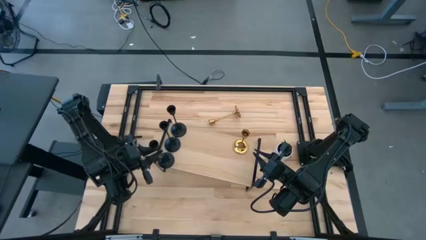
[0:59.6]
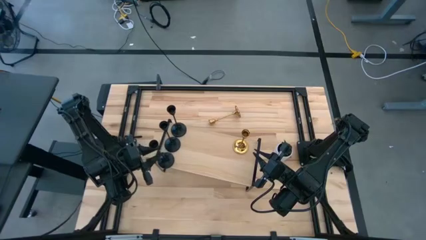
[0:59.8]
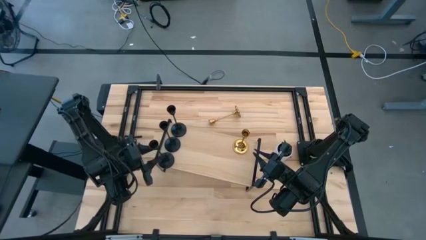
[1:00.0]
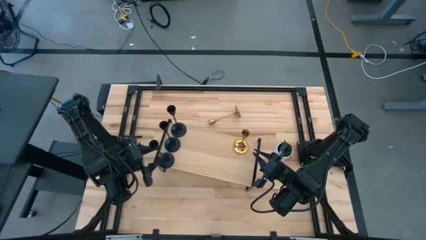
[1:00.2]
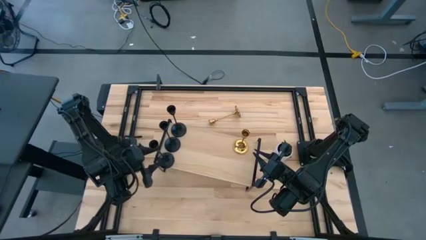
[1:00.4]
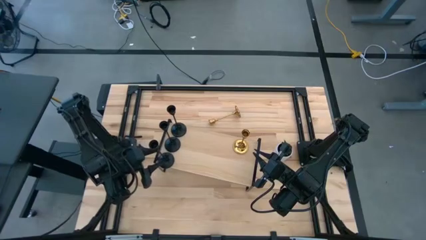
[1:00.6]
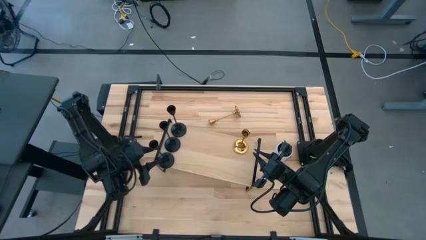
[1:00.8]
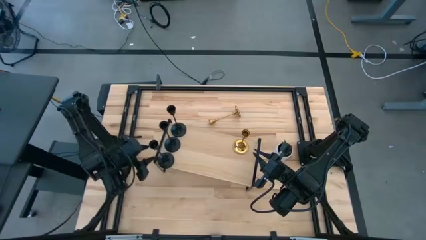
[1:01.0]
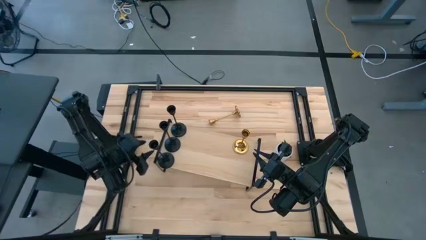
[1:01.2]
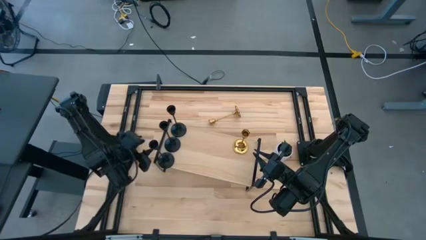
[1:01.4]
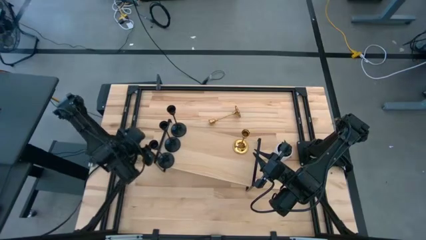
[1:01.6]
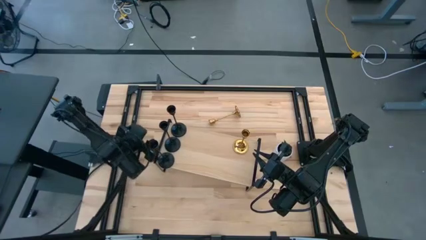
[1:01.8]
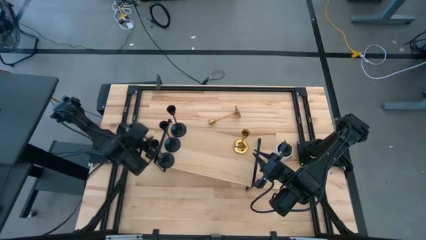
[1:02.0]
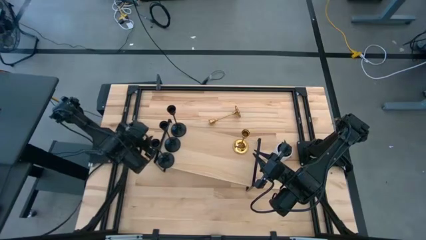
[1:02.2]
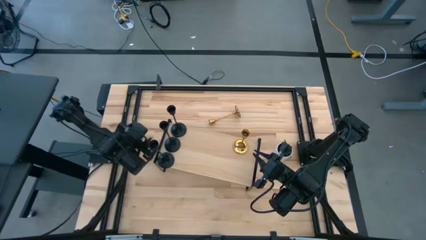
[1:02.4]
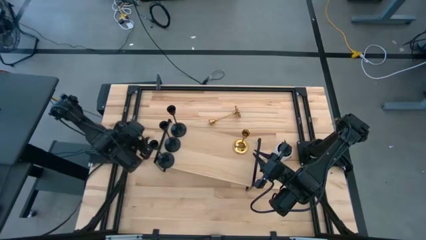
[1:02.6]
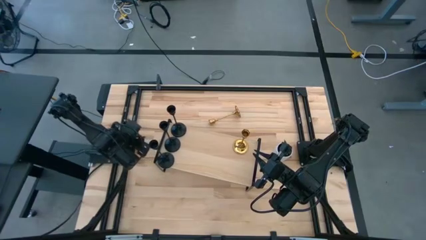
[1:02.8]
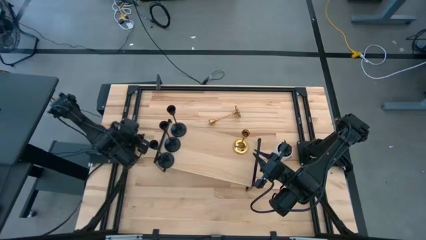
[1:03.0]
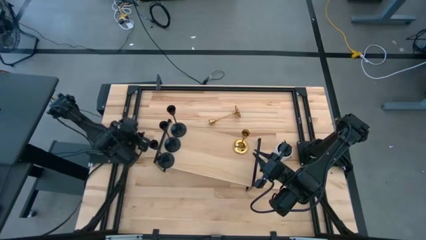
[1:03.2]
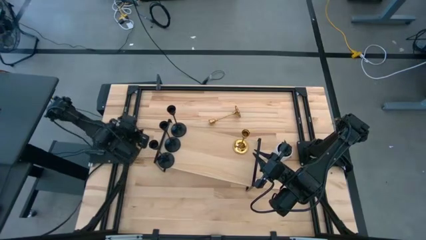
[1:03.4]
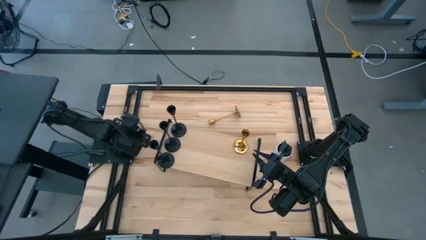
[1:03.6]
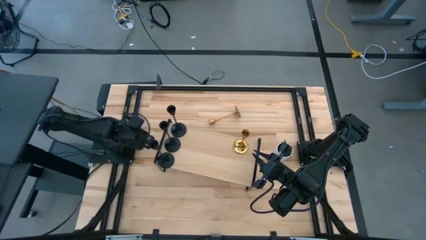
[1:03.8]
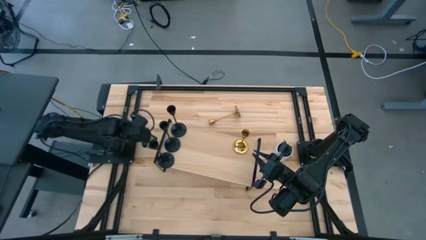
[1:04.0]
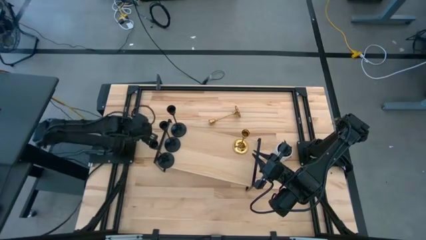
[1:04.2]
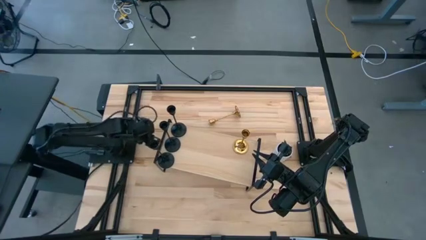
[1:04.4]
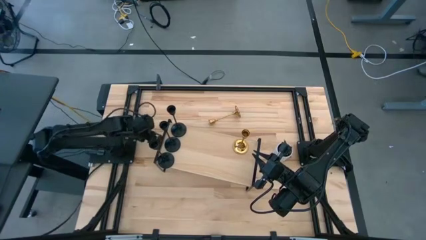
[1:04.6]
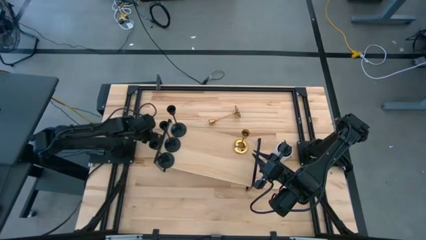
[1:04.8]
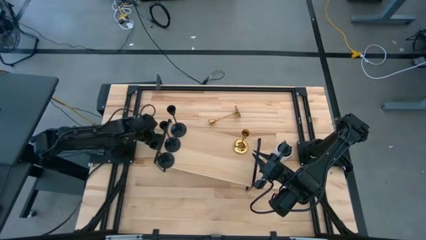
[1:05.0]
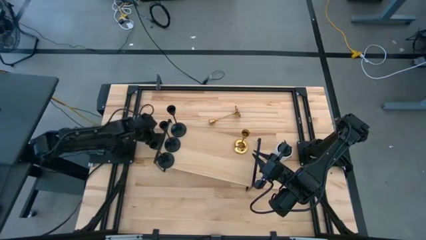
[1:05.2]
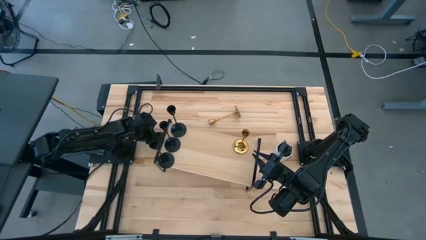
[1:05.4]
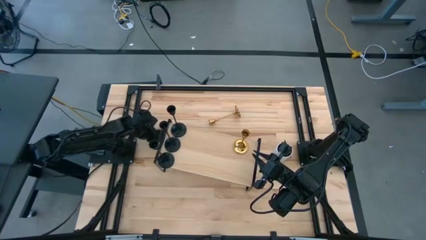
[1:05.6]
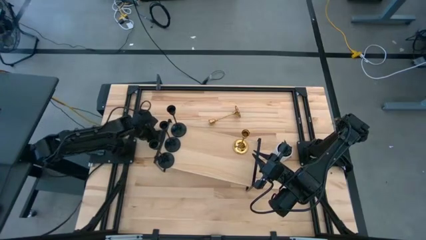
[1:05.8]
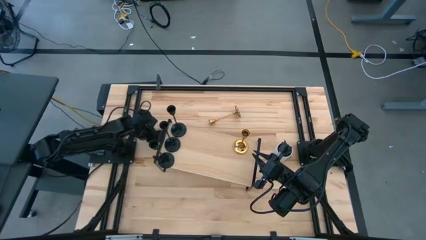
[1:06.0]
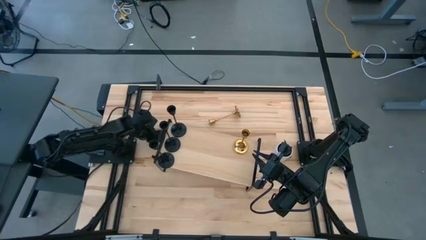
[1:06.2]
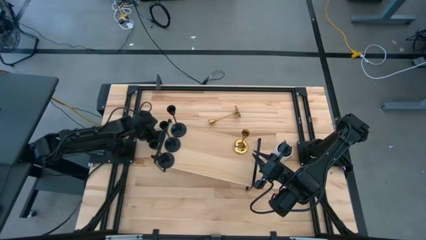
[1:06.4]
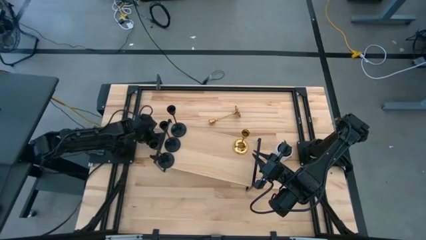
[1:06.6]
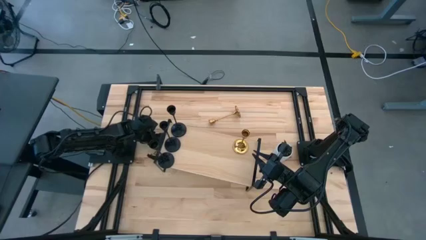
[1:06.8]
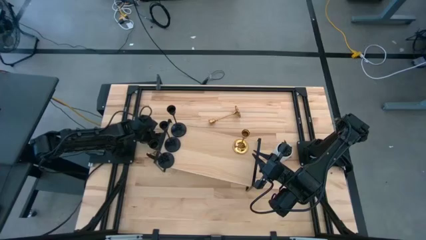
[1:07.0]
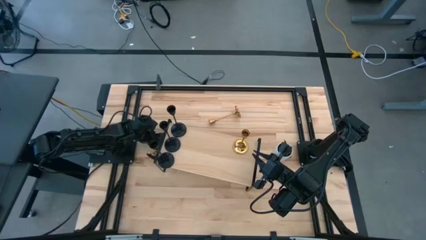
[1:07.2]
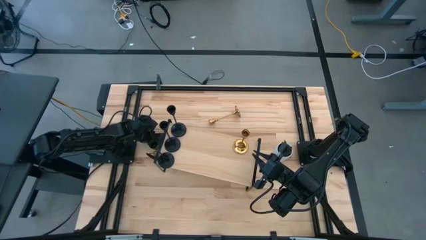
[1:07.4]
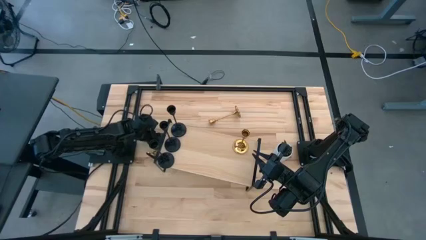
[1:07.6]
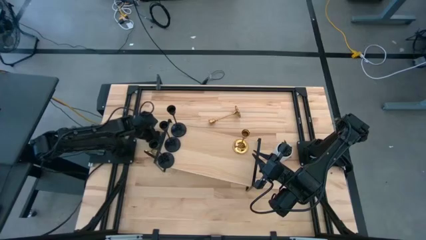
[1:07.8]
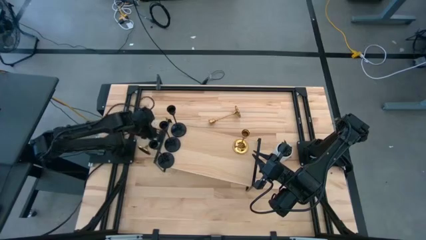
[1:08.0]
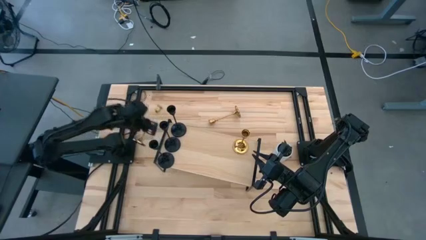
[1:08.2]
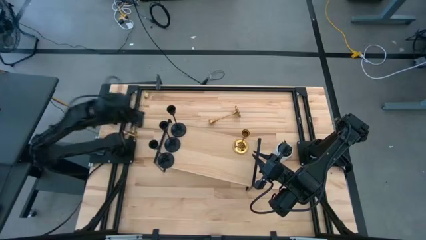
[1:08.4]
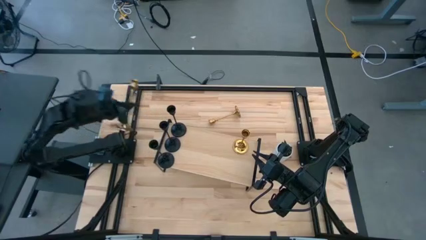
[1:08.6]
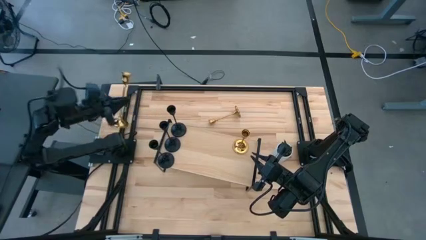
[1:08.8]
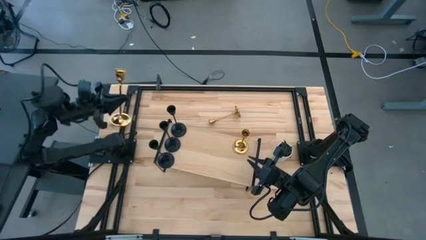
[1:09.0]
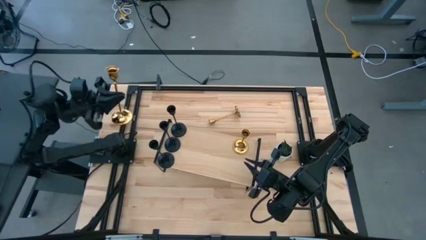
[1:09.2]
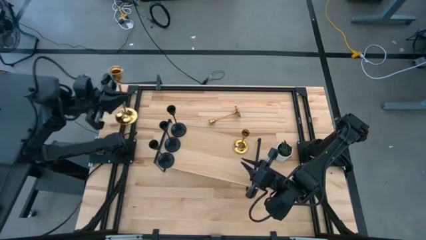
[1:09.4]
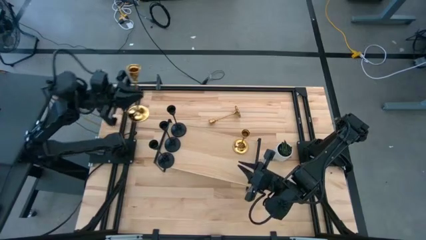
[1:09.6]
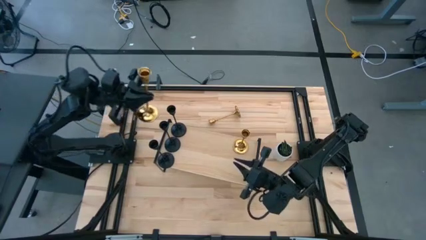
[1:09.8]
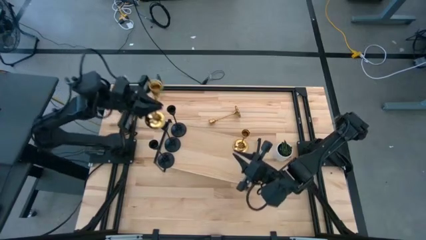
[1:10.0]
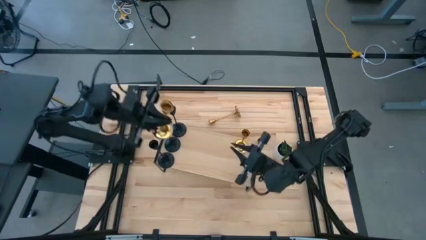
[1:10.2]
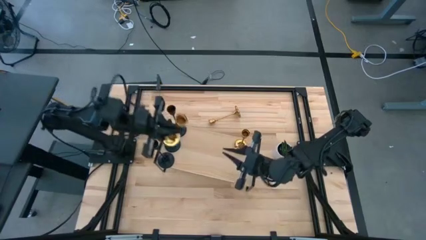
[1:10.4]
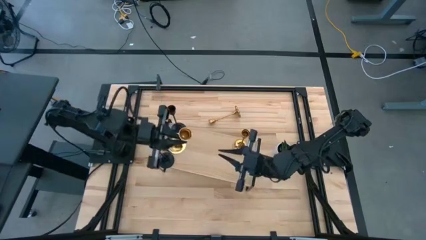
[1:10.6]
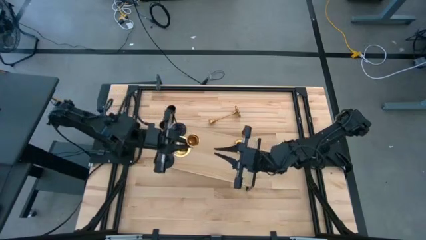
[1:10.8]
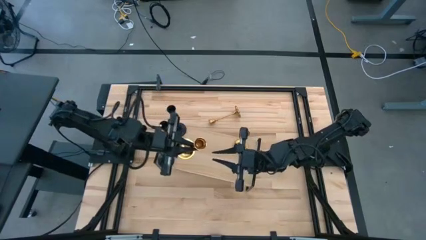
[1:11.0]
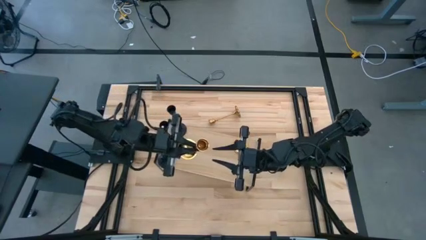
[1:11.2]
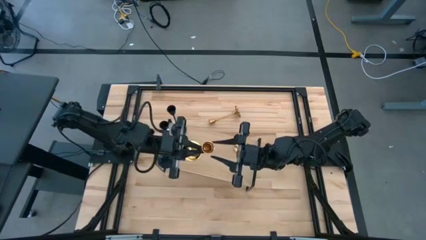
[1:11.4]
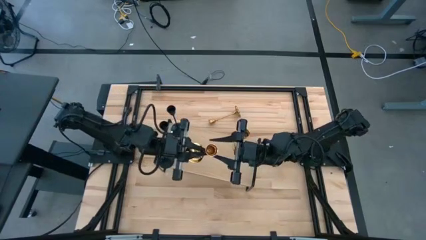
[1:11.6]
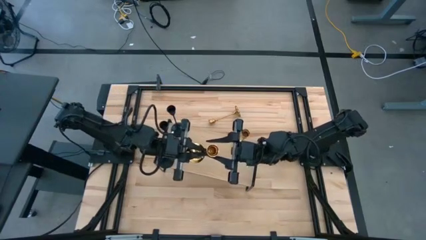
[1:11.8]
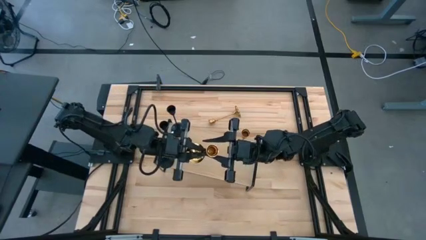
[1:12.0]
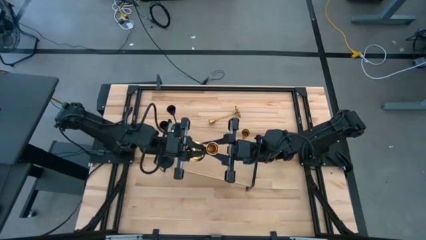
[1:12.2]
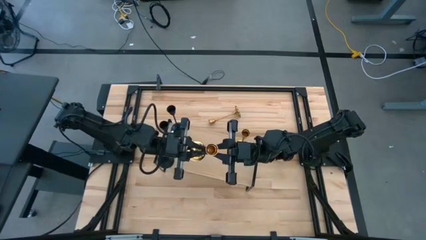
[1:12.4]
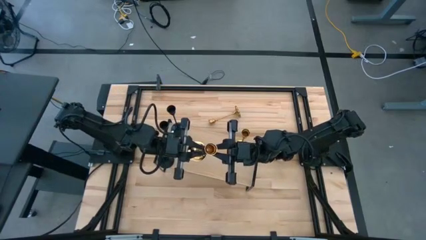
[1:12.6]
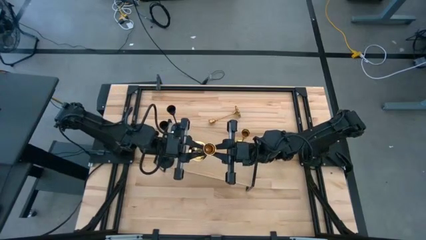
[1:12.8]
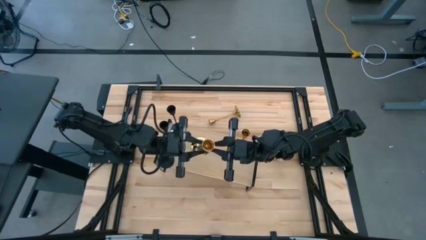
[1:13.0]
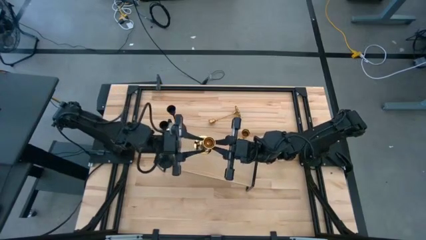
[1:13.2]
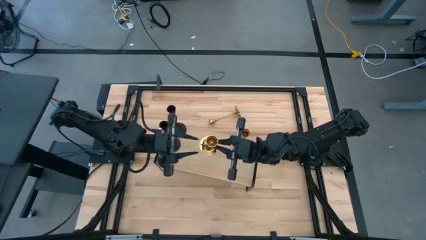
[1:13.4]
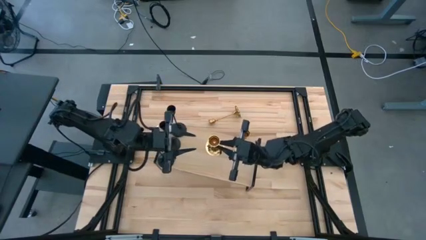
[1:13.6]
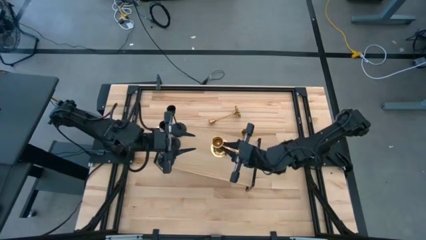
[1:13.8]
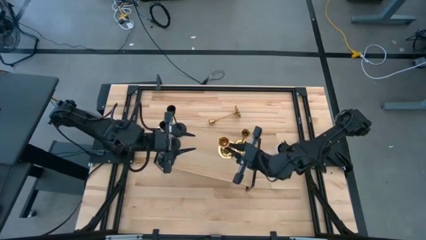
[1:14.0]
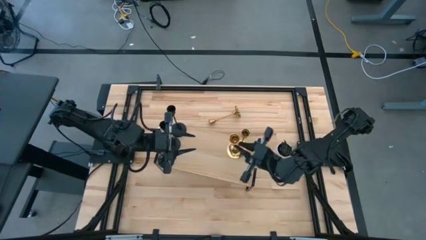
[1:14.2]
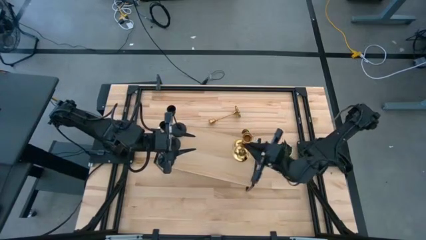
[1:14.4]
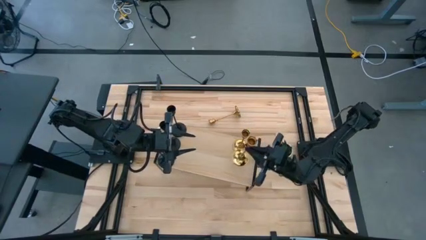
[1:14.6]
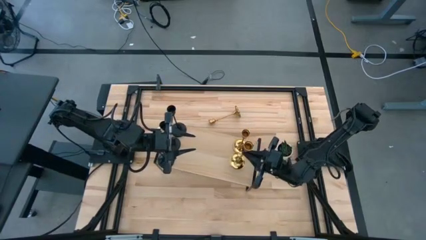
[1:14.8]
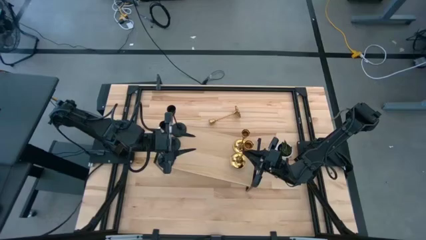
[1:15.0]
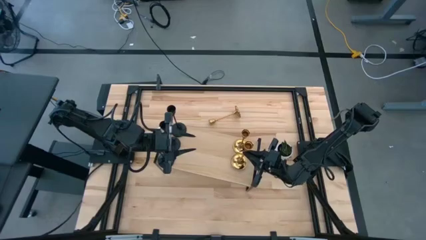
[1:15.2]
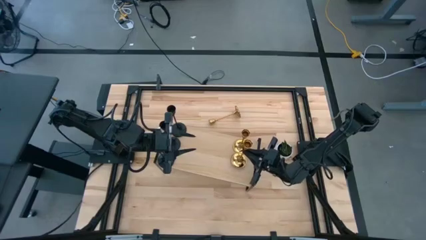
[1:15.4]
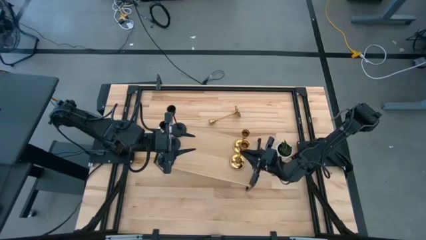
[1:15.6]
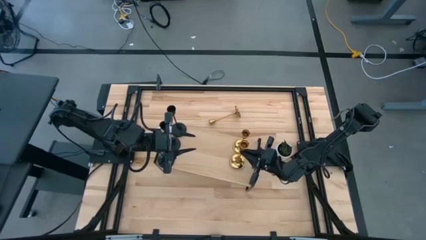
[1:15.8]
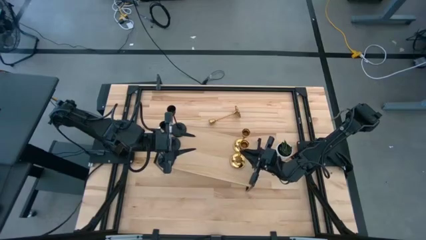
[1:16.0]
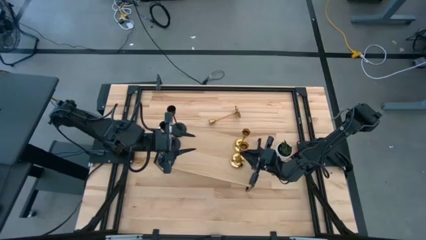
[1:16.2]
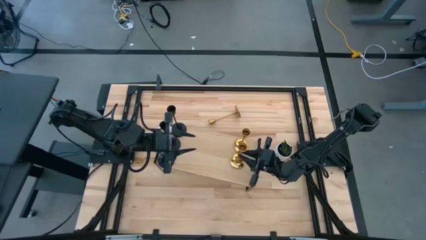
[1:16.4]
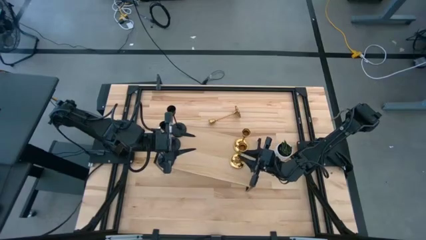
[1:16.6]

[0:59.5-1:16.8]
Task: Pick & Place candle stick holders
Put the left gold candle holder on the shelf aligned with the other gold candle holder
